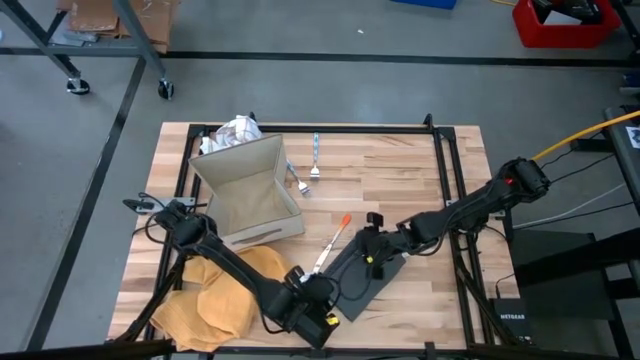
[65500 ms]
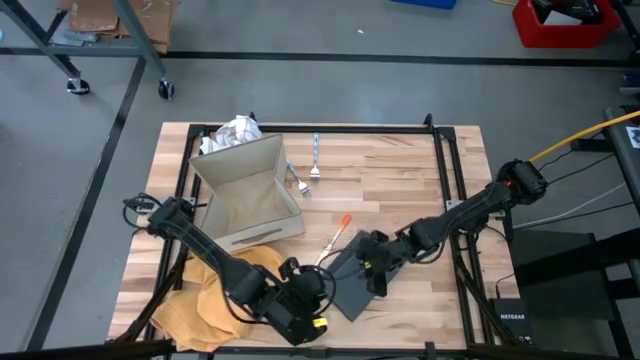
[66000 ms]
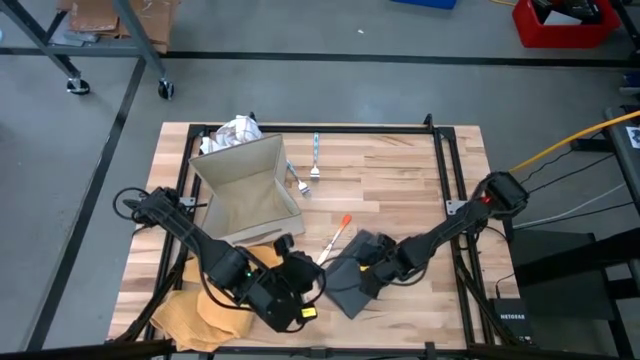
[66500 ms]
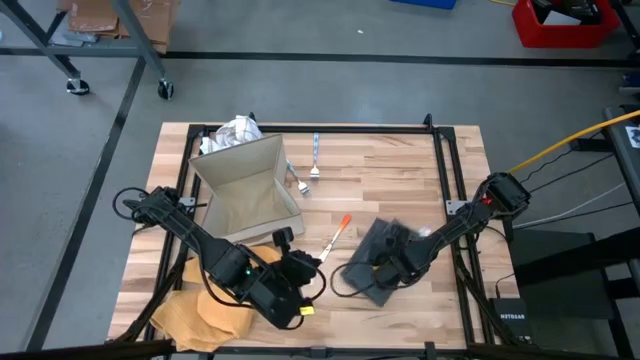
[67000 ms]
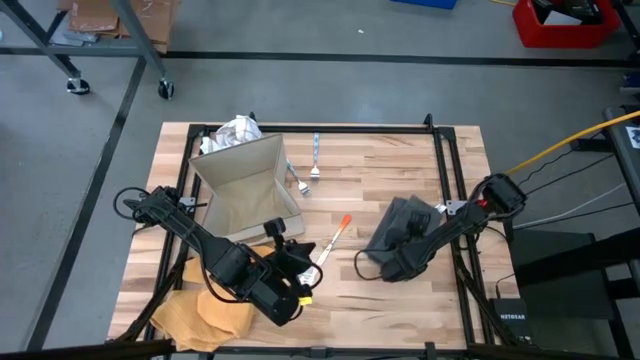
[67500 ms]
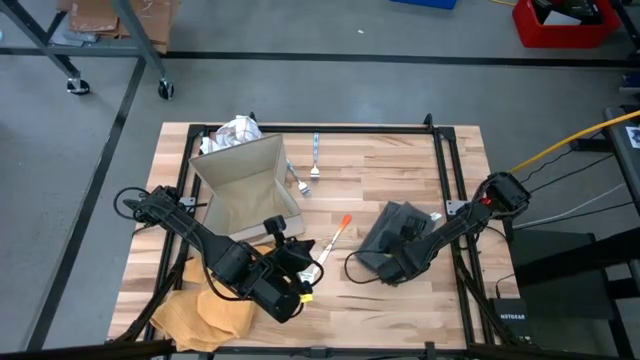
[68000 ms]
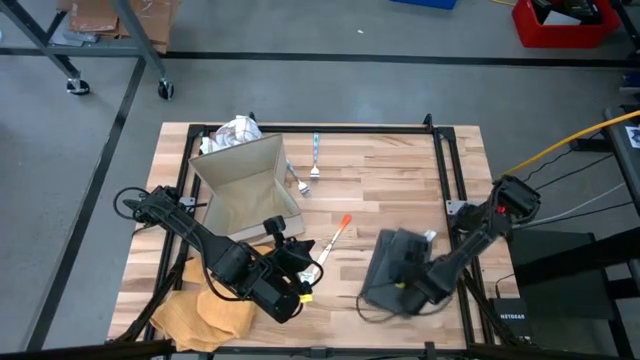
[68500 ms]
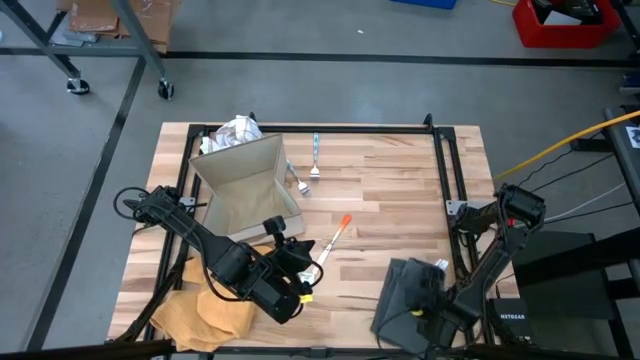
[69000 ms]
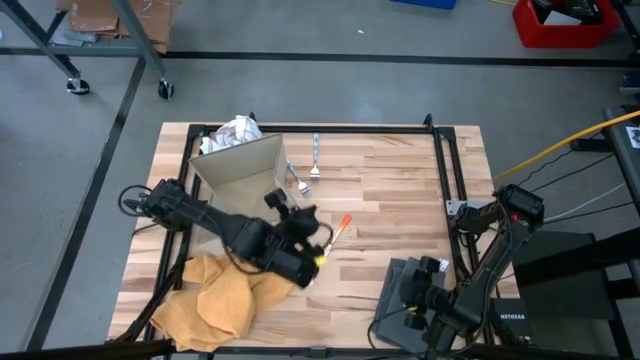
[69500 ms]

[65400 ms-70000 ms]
Task: Fold towel
Move the gray kitchen towel to the bottom right of the table

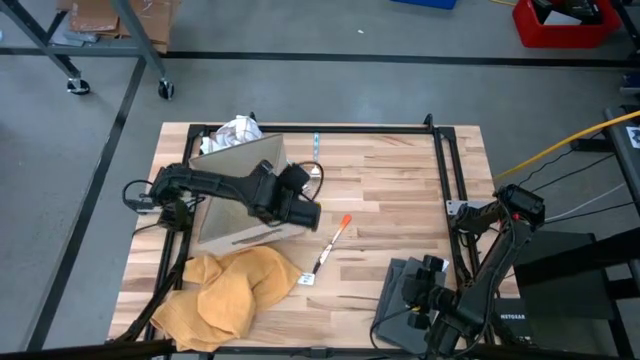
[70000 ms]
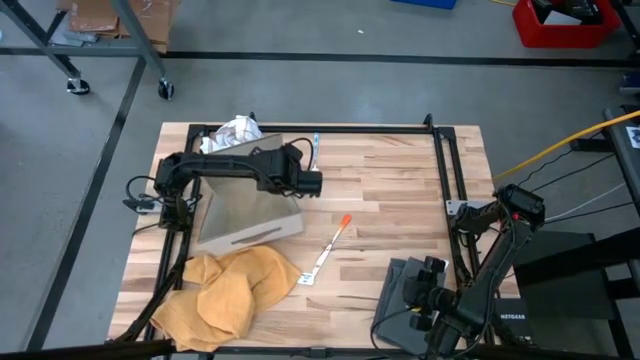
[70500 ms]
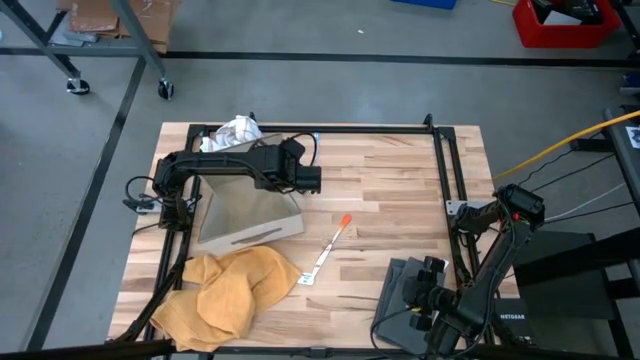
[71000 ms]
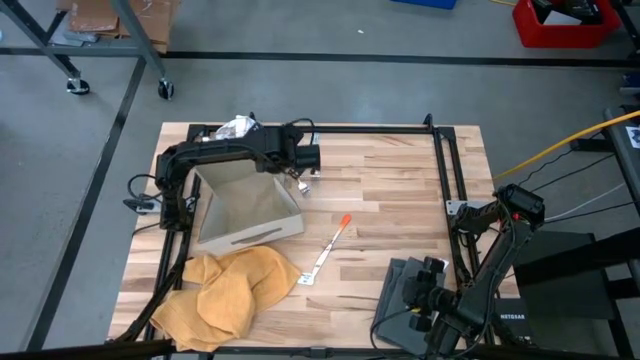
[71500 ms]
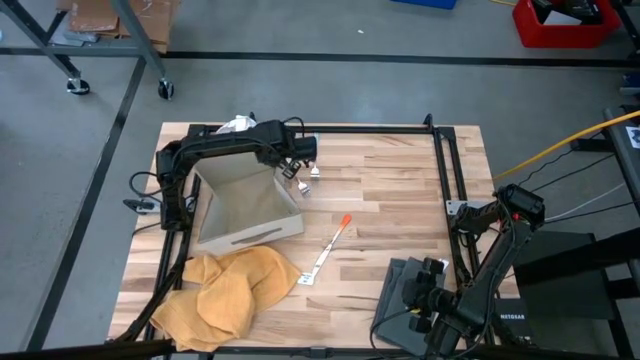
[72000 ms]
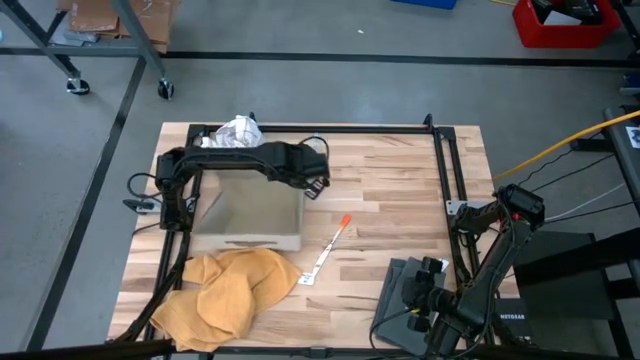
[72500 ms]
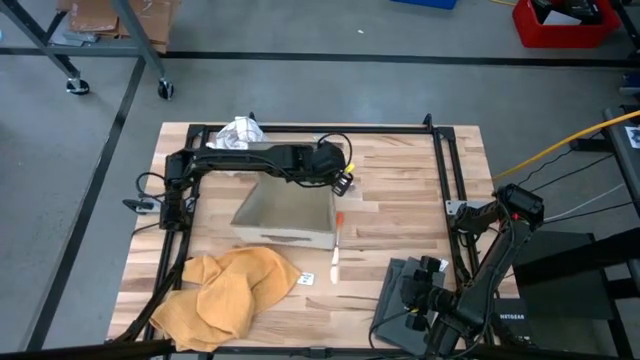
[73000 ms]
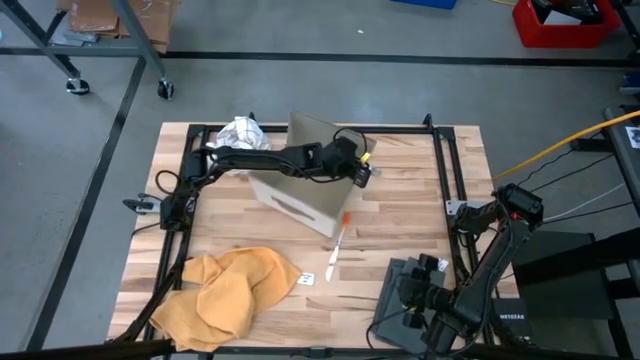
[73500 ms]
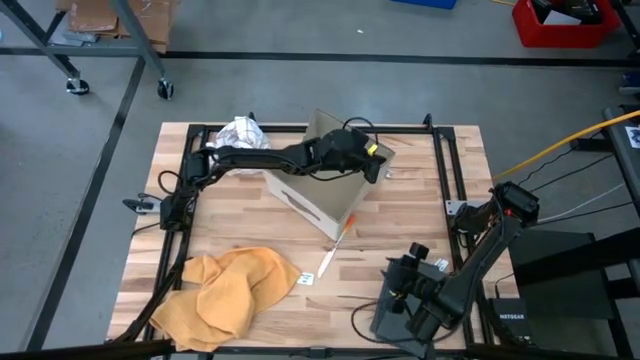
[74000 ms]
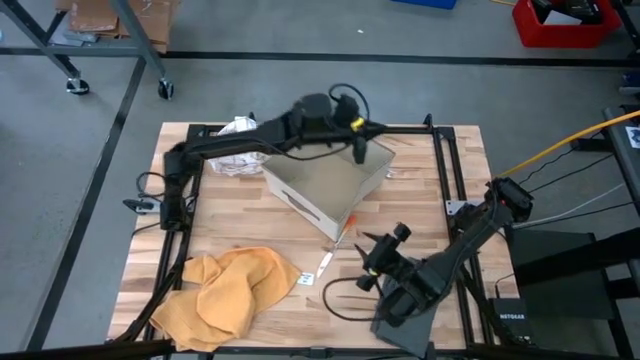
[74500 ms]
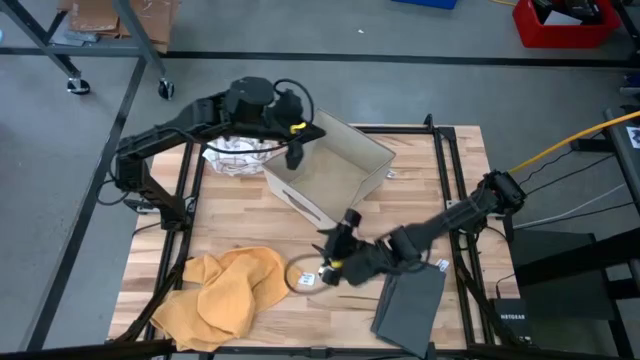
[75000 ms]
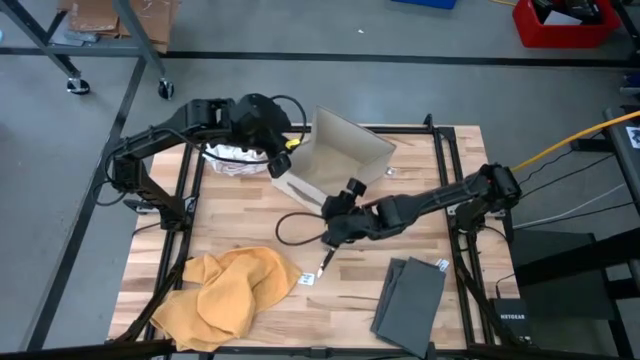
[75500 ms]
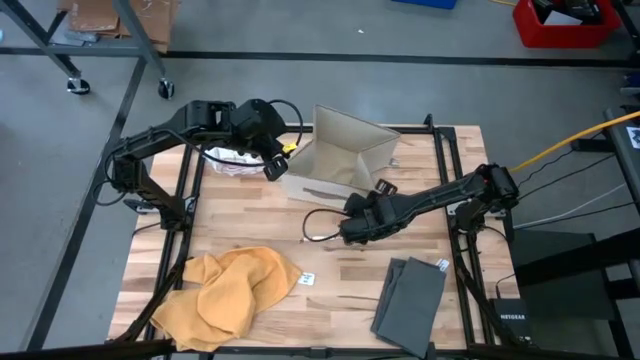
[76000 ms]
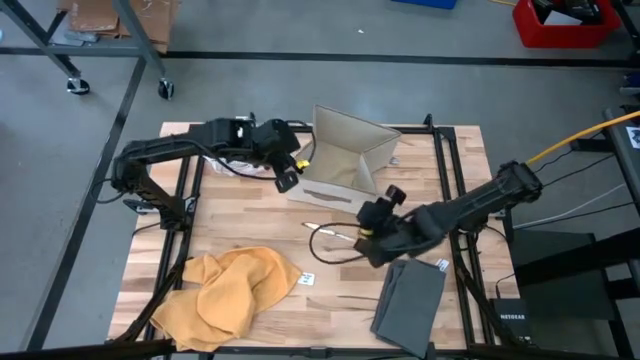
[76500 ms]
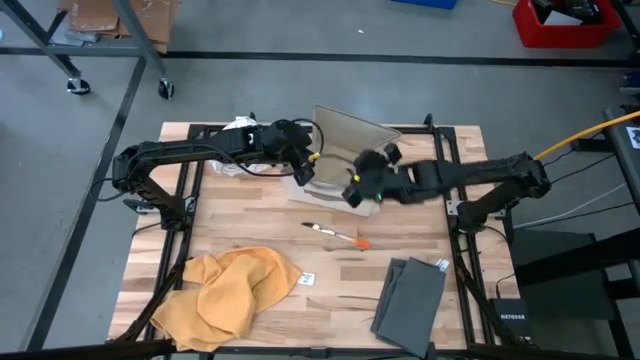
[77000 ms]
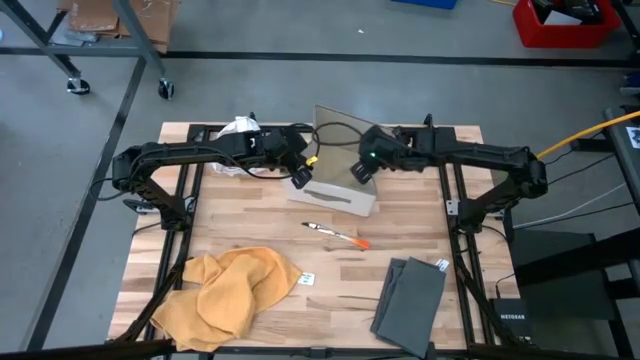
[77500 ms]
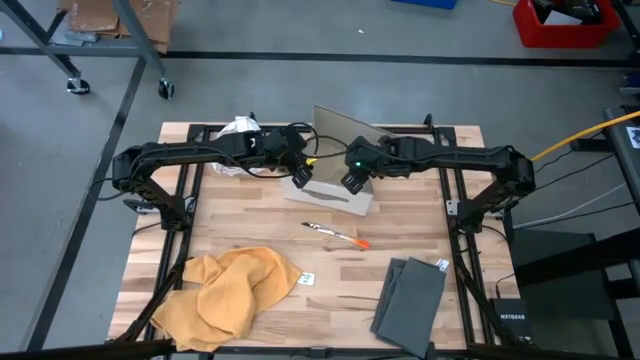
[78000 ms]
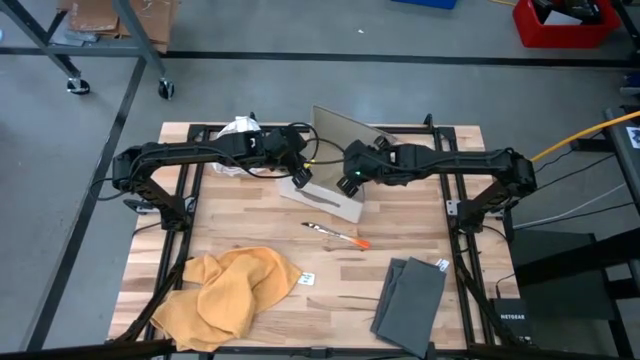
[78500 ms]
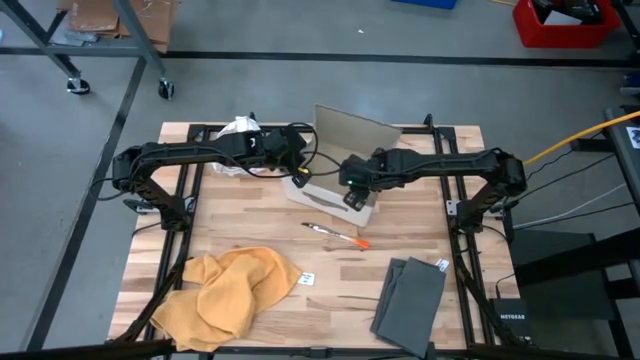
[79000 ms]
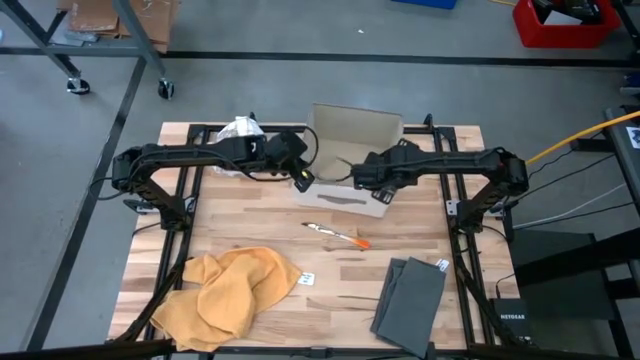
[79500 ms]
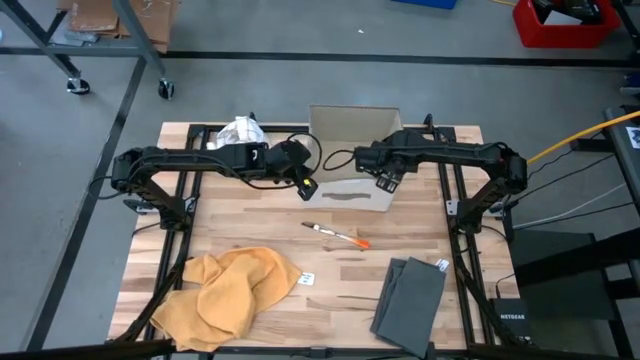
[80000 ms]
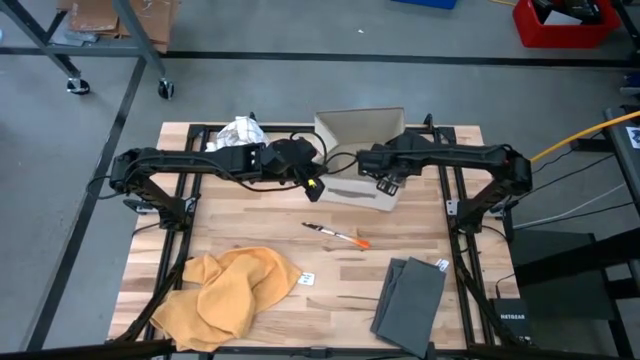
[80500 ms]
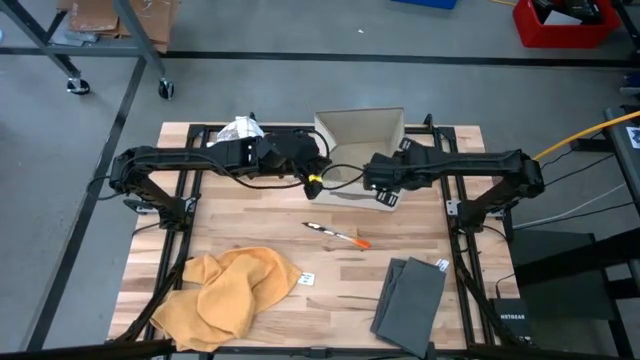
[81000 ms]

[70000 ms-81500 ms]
Move the brown laundry organizer to the top right of the table
